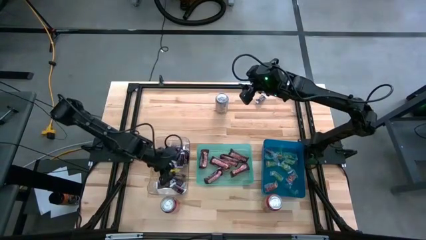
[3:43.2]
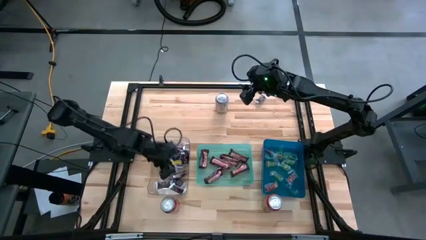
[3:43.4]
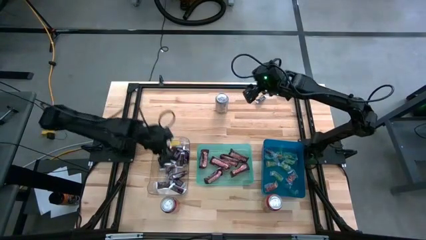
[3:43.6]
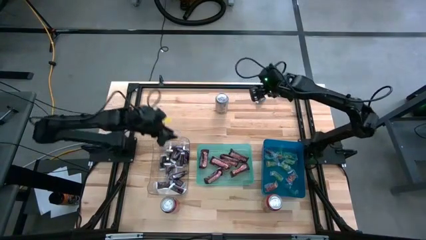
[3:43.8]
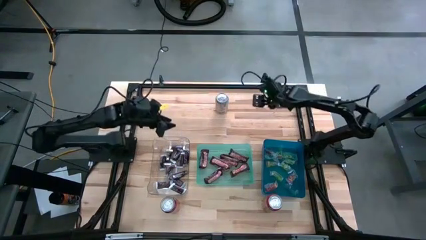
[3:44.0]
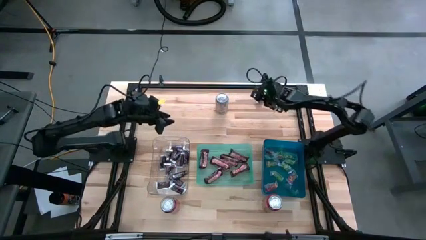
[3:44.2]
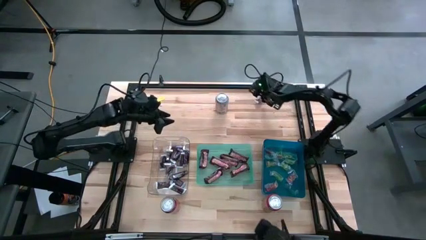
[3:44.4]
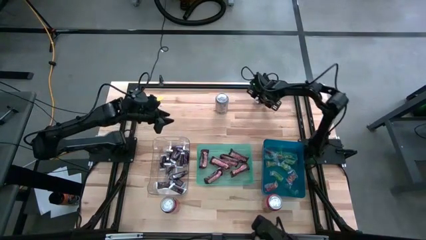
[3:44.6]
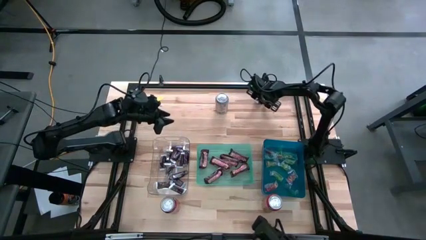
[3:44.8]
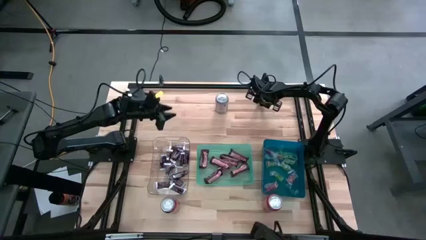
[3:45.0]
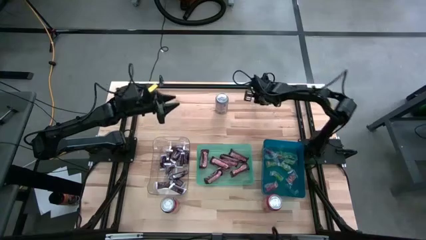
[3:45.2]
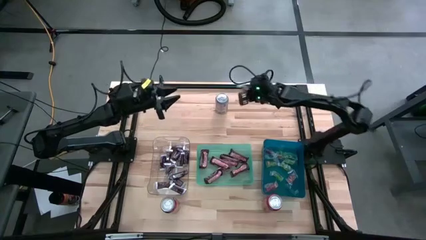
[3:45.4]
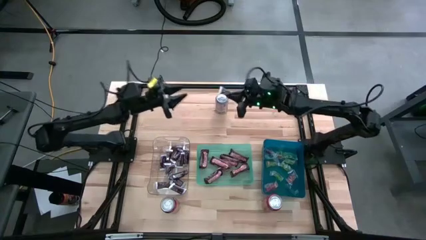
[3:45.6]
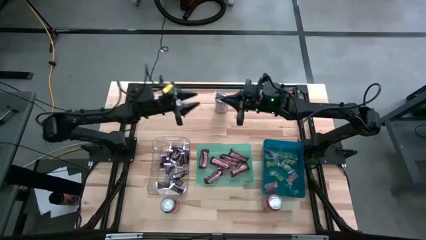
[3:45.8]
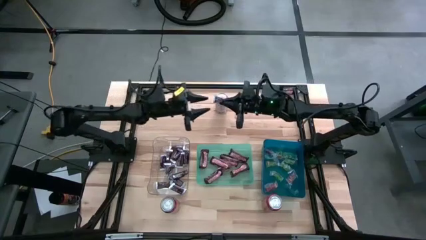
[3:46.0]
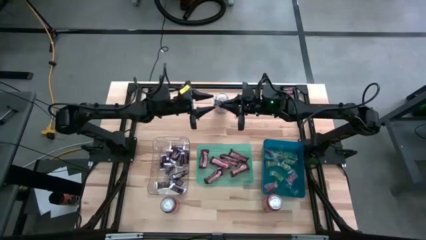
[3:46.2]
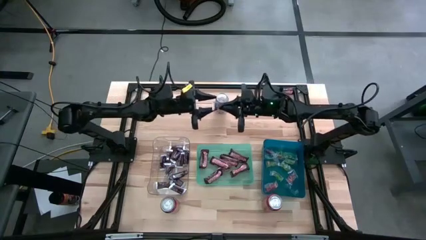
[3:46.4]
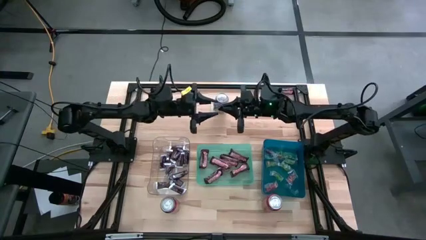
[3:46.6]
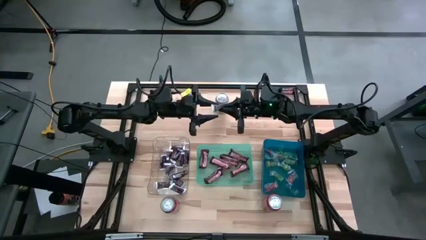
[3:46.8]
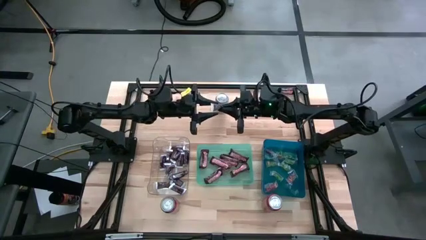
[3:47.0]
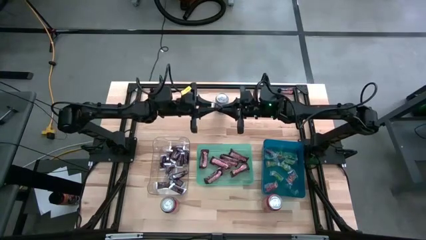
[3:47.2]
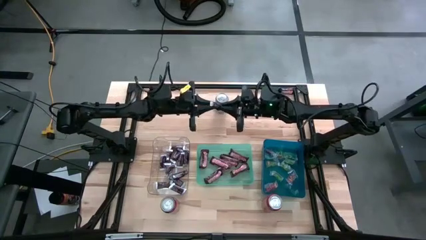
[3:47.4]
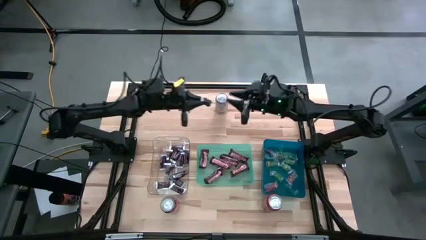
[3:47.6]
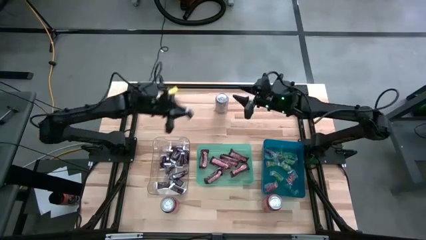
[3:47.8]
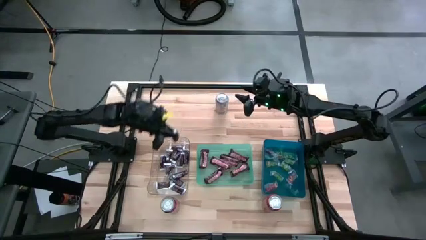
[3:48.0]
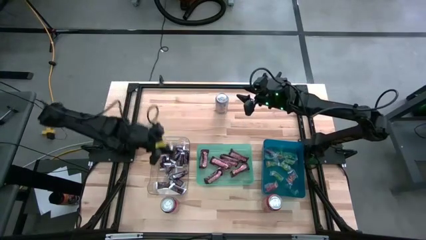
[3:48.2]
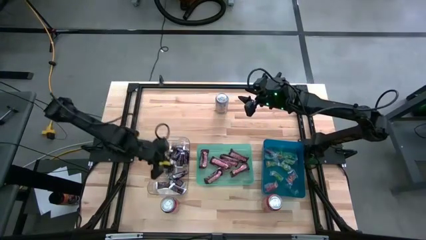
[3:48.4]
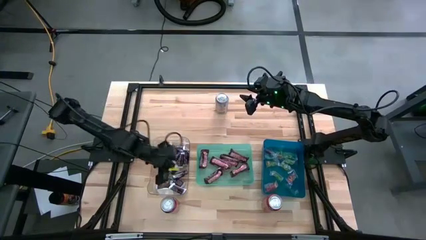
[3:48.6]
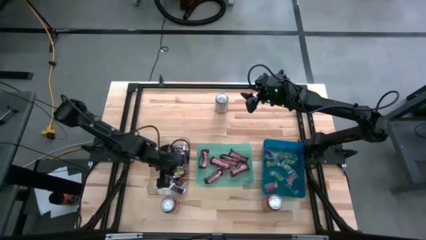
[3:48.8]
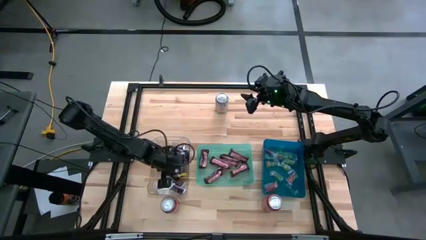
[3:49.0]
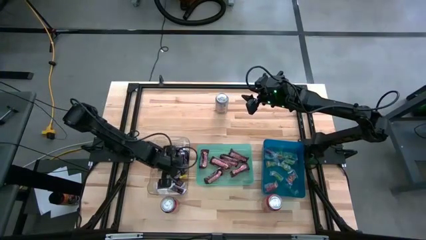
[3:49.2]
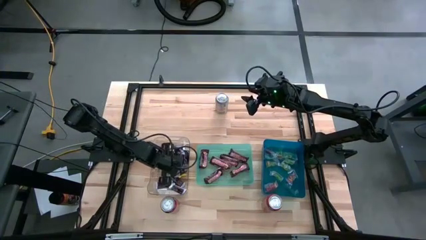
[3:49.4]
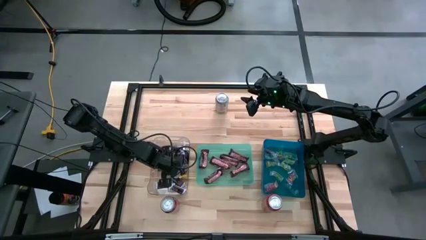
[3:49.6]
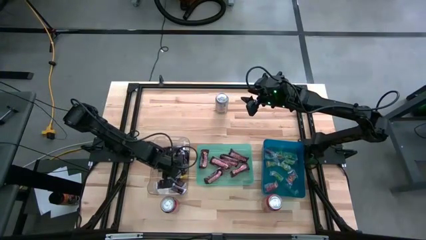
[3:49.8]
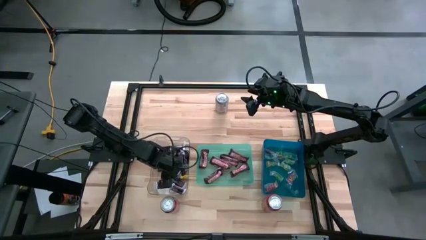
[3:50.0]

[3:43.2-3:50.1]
Task: Organize candy in baskets
Put the brown white chocolate bar into the transparent bin

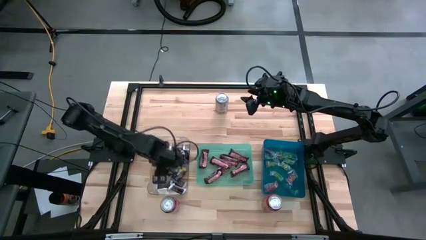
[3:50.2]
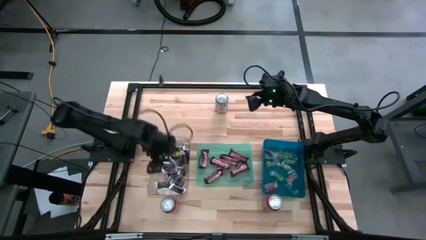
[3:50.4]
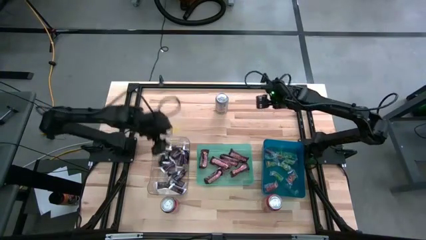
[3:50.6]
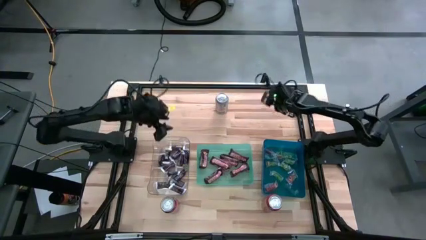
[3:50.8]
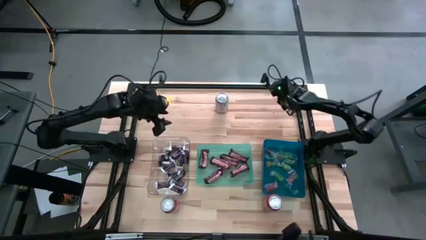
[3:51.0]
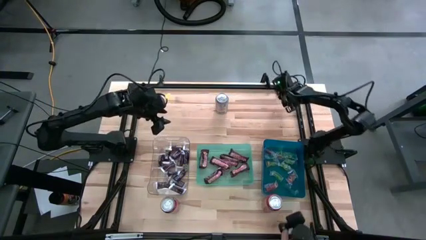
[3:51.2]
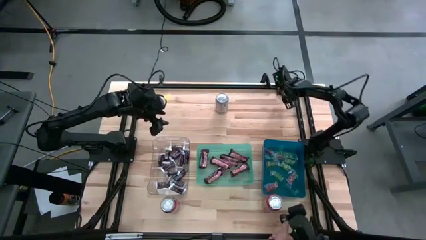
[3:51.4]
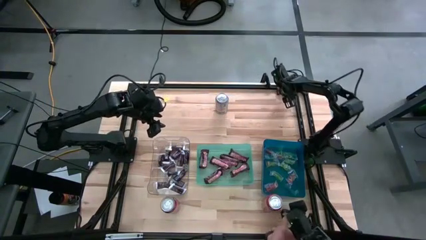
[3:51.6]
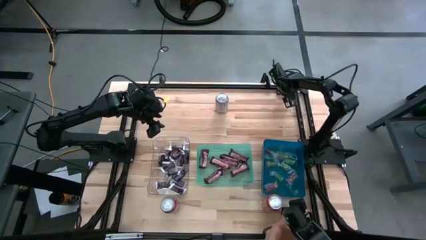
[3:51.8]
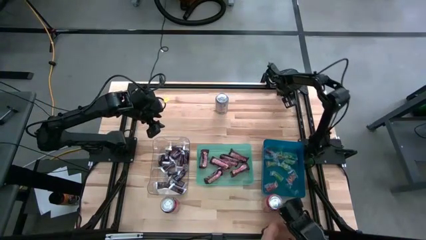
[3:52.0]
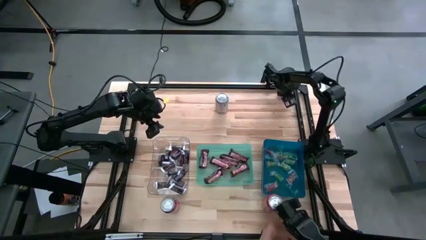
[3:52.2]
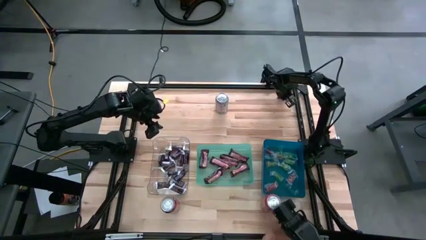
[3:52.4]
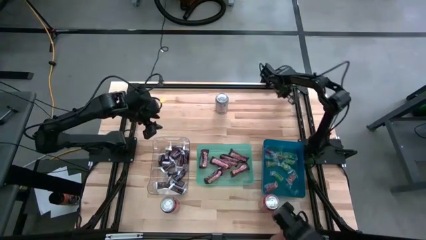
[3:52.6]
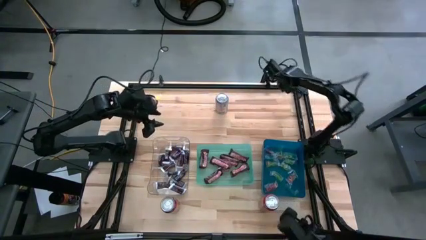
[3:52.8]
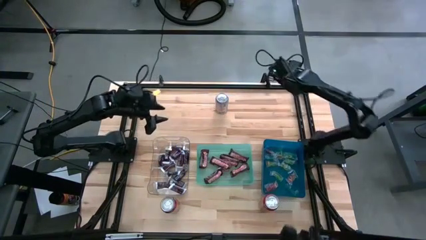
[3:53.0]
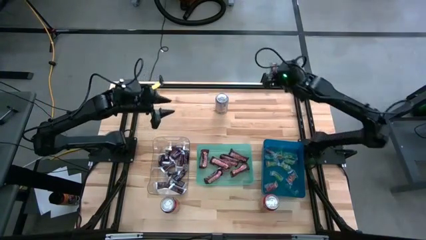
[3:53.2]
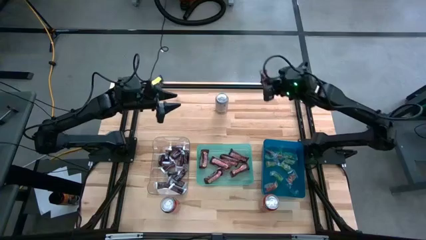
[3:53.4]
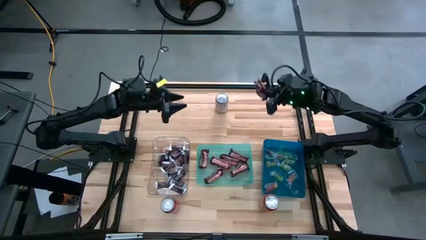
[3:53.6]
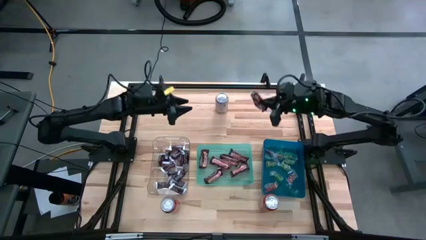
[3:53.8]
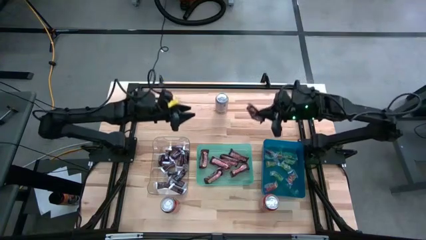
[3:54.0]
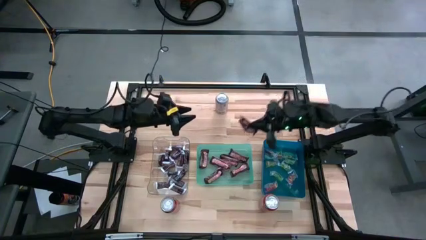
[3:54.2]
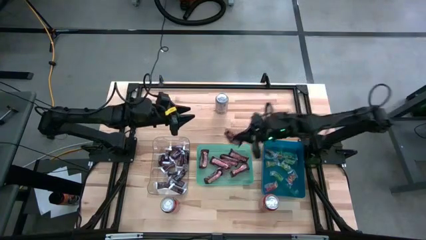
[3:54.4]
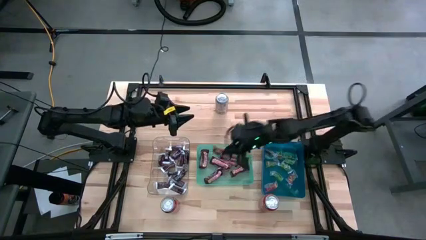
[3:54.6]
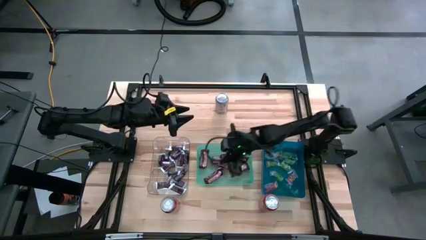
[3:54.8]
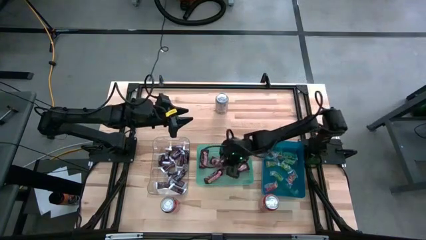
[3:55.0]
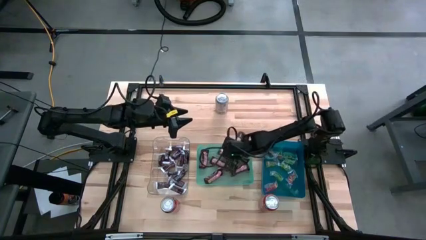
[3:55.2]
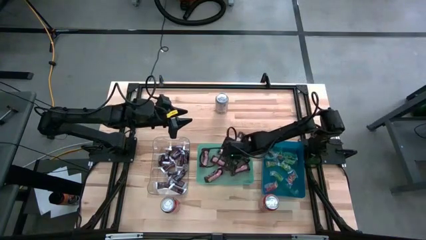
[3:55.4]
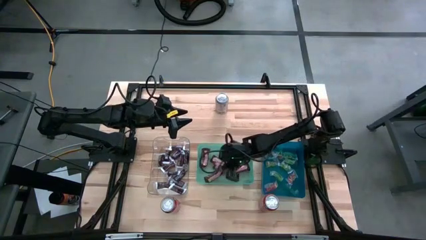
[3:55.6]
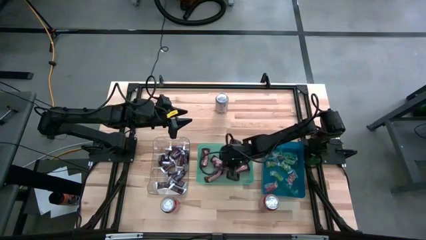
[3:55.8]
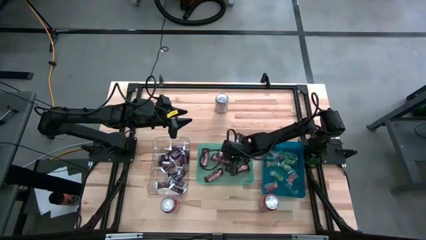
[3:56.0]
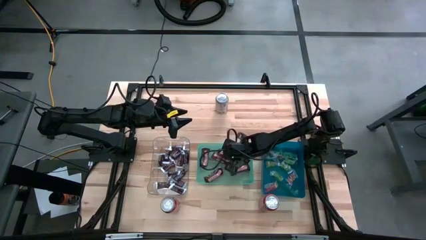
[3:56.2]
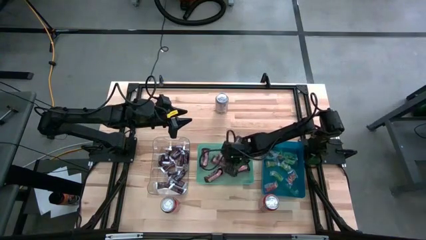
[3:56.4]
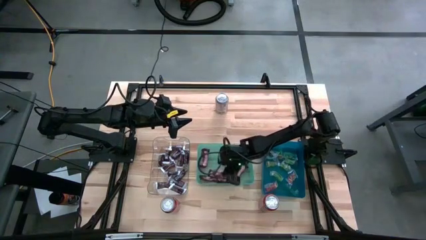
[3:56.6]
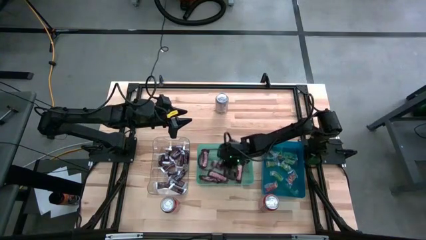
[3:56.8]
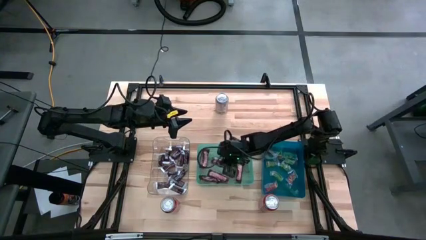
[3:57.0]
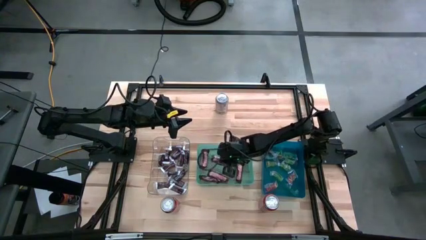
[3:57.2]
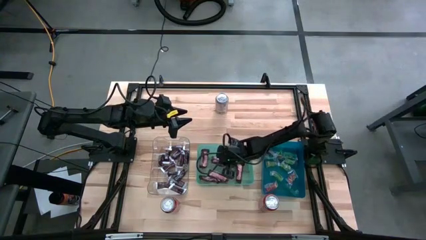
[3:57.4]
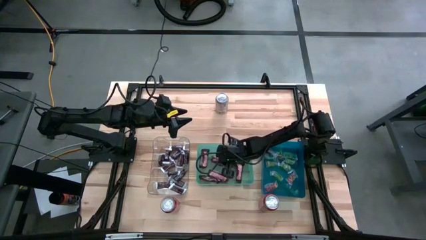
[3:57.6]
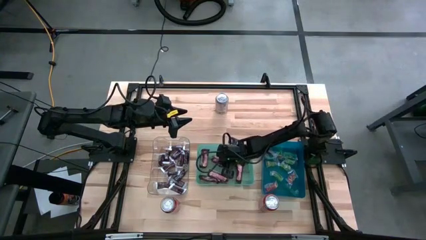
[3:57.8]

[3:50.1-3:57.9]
Put the brown chocolate bar into the green bin
